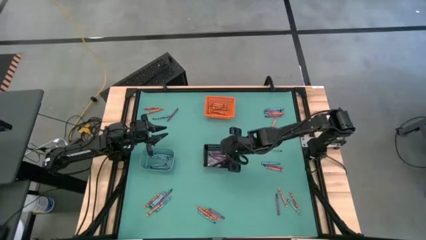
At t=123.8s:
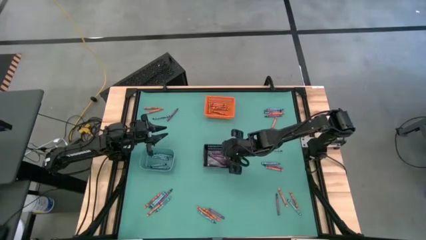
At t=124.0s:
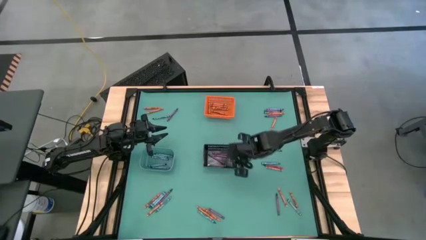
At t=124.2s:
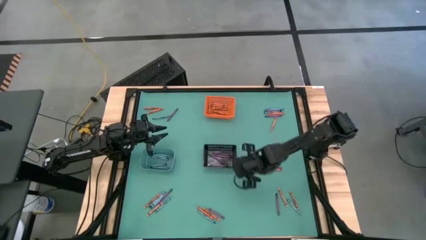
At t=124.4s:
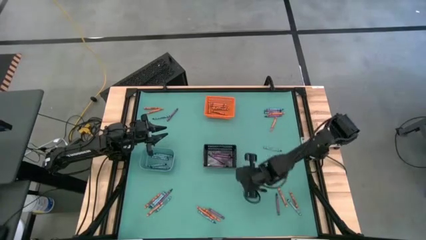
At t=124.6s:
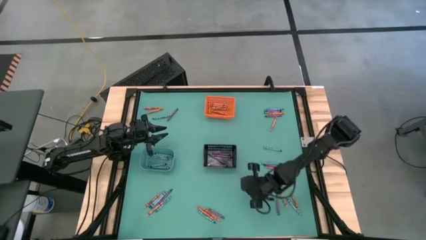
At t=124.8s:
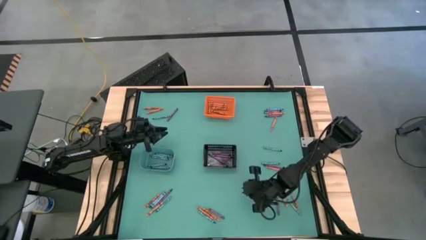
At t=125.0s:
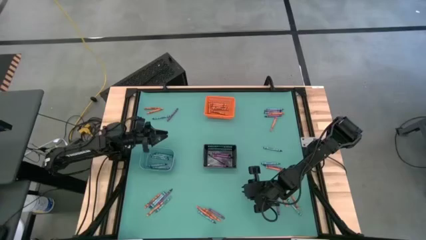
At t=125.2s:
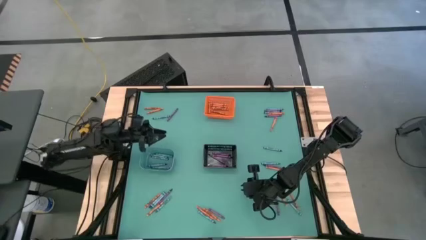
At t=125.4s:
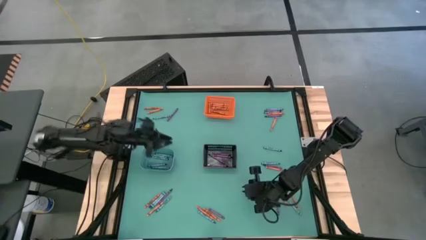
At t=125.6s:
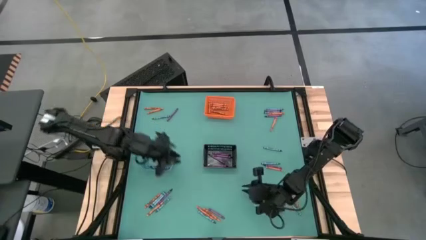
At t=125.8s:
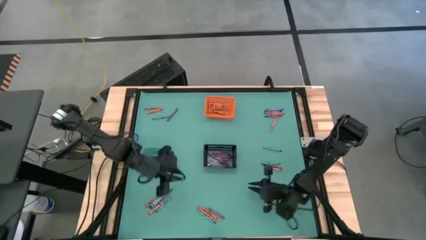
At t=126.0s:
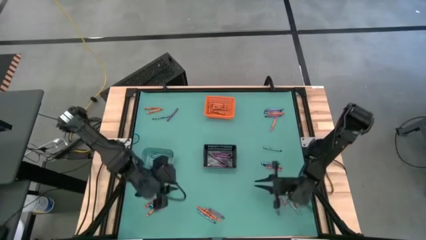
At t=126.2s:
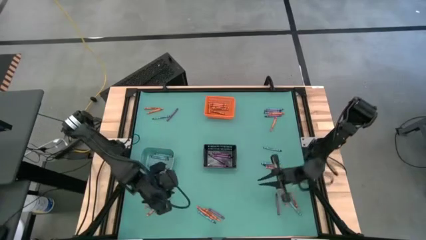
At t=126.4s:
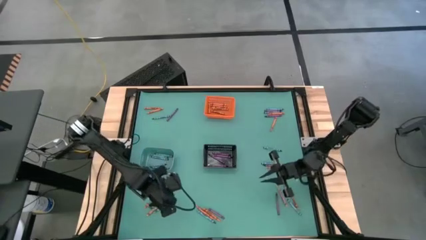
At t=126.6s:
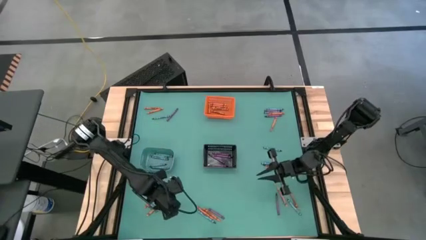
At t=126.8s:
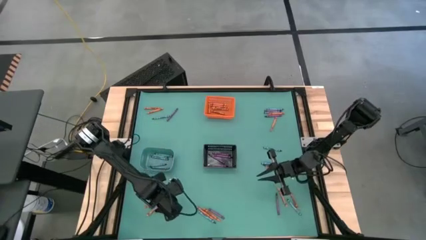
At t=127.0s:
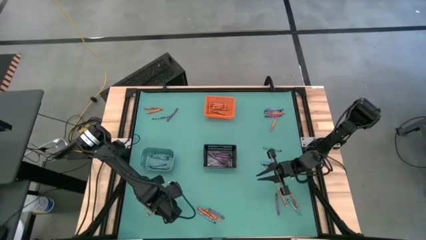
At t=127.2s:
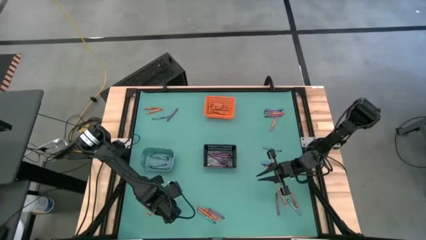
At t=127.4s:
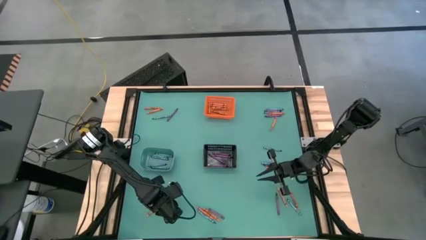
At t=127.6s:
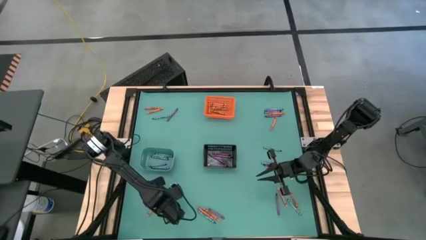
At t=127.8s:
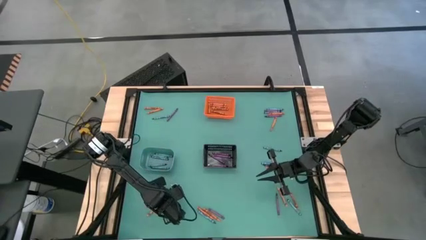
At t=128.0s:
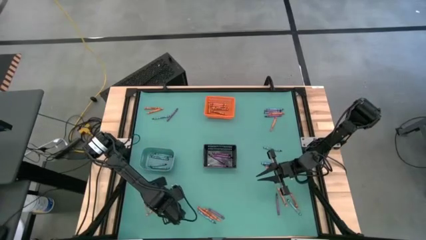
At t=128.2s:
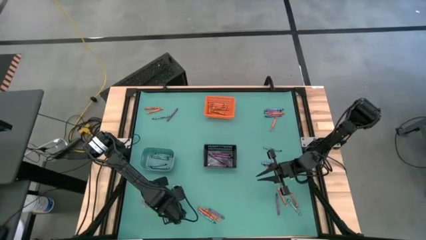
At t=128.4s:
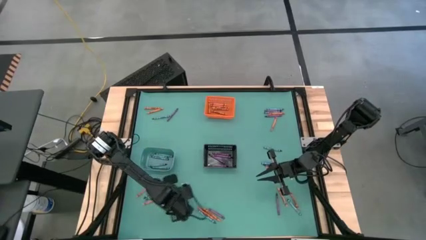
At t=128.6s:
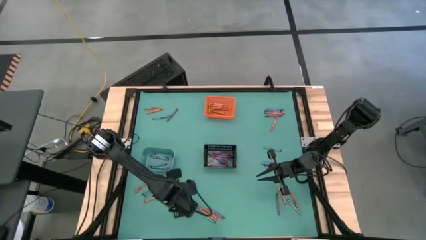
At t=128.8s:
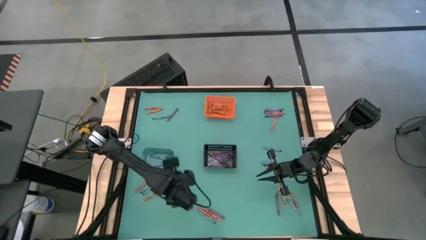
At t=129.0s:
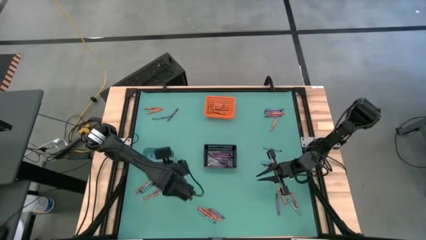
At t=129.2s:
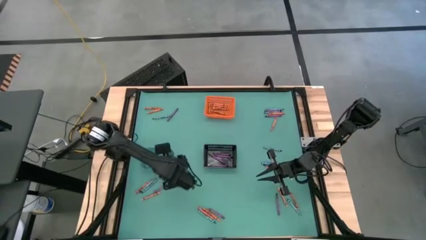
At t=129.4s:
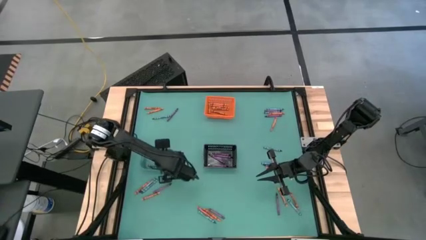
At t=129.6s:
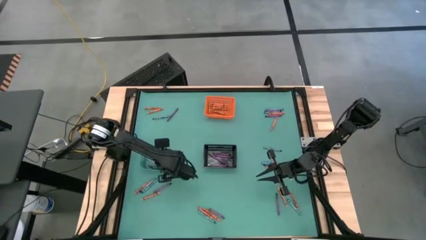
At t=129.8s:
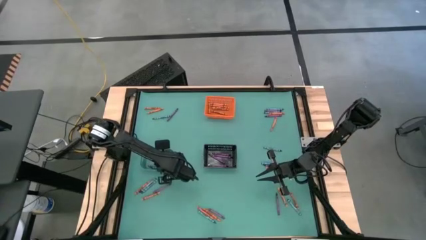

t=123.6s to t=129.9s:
Task: Sort crayons
Put the blue crayon into the light blue bin

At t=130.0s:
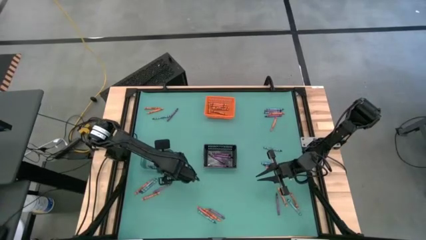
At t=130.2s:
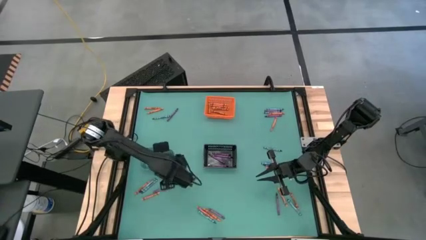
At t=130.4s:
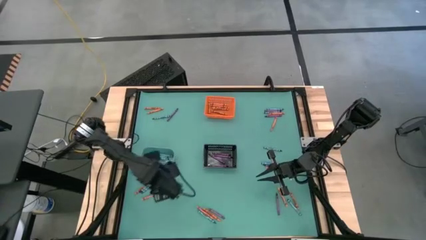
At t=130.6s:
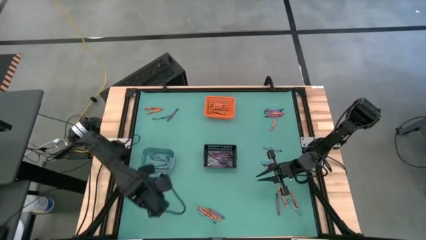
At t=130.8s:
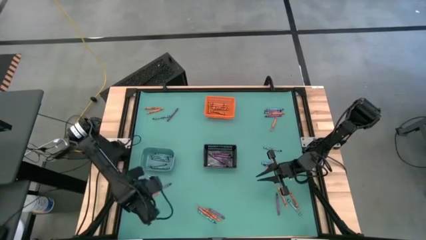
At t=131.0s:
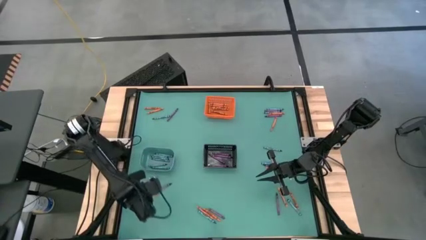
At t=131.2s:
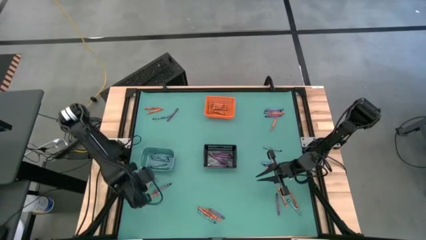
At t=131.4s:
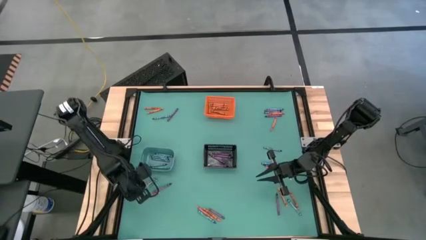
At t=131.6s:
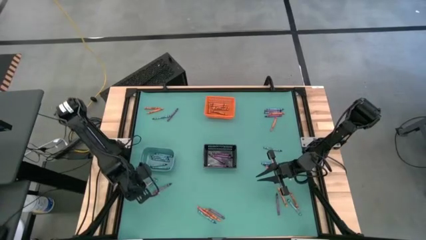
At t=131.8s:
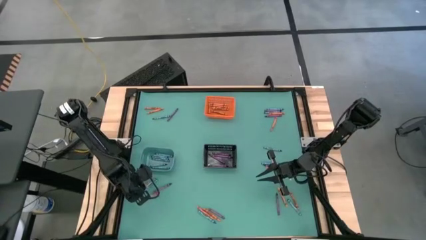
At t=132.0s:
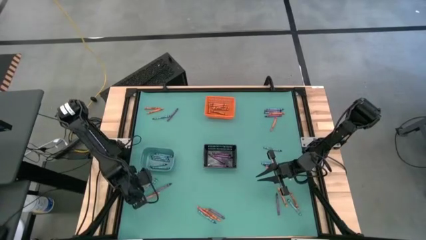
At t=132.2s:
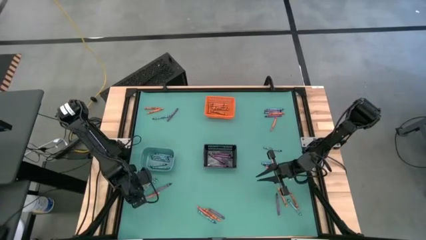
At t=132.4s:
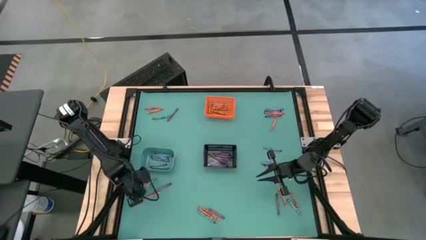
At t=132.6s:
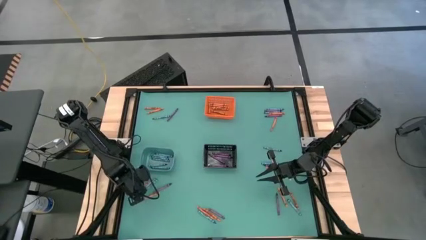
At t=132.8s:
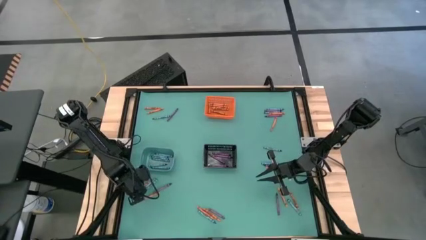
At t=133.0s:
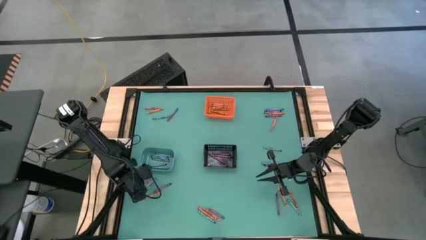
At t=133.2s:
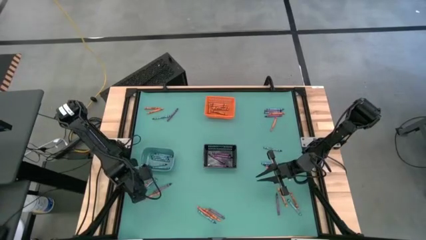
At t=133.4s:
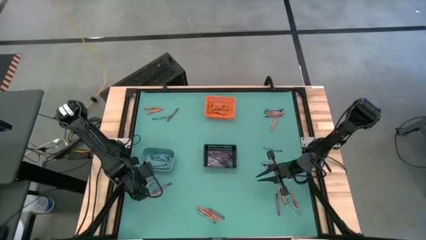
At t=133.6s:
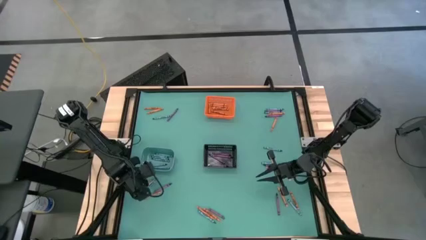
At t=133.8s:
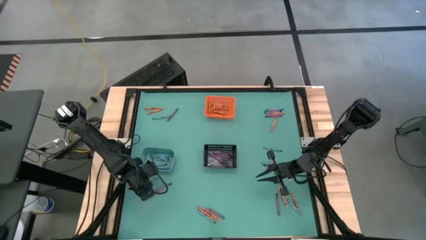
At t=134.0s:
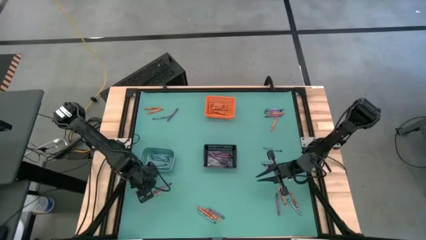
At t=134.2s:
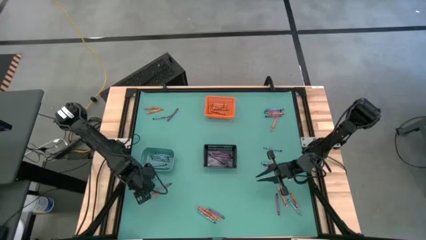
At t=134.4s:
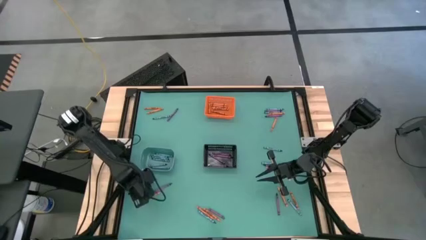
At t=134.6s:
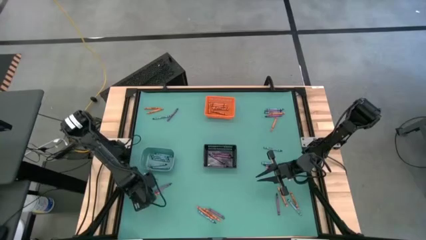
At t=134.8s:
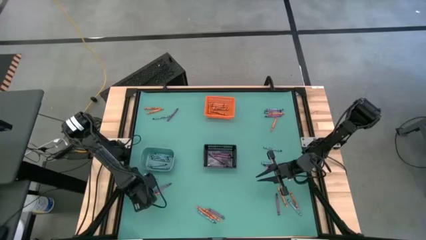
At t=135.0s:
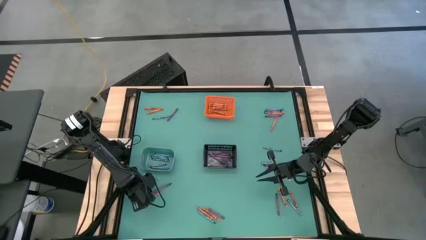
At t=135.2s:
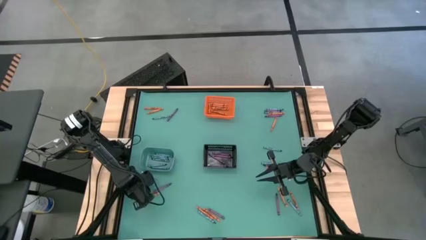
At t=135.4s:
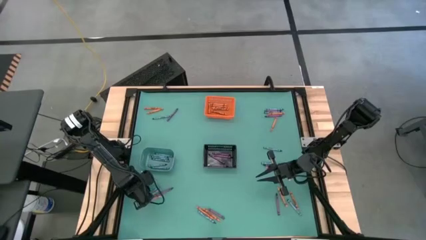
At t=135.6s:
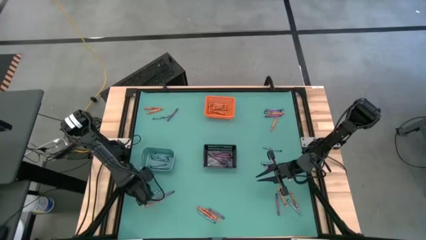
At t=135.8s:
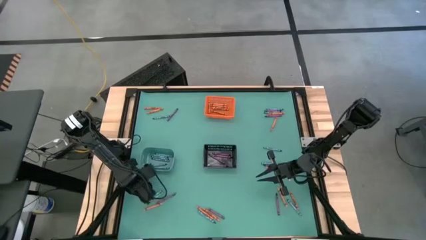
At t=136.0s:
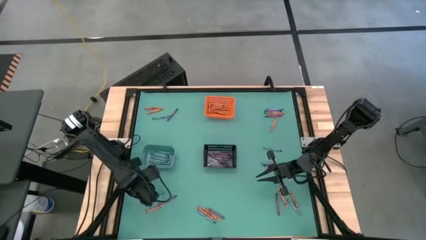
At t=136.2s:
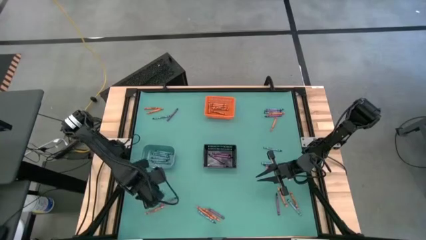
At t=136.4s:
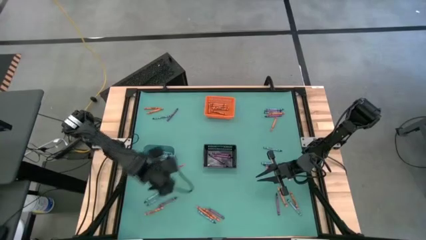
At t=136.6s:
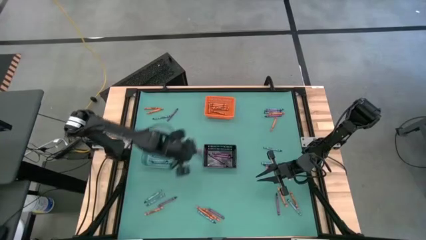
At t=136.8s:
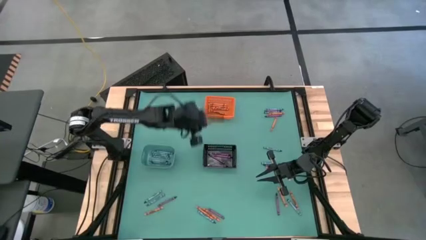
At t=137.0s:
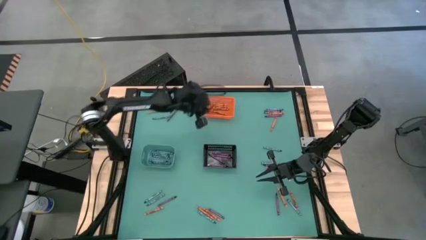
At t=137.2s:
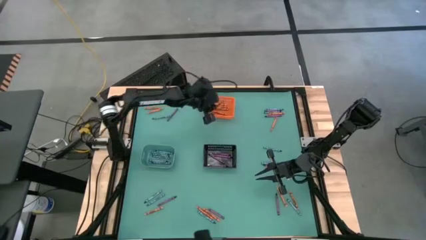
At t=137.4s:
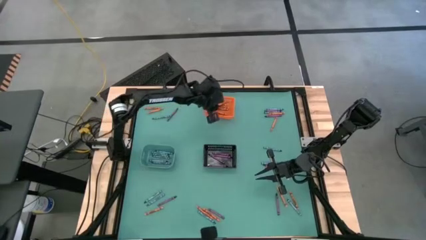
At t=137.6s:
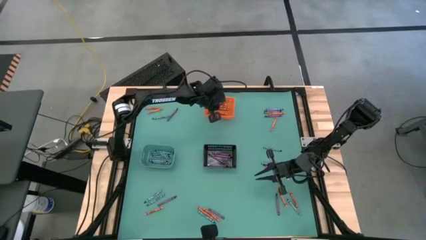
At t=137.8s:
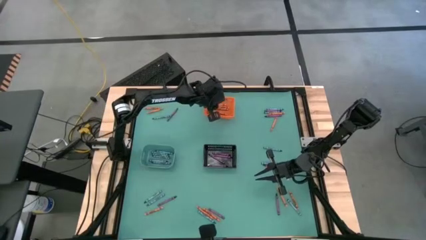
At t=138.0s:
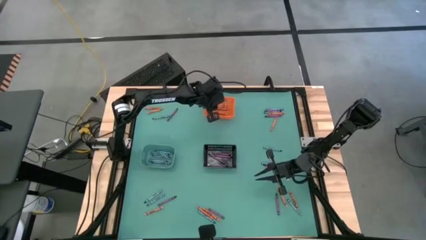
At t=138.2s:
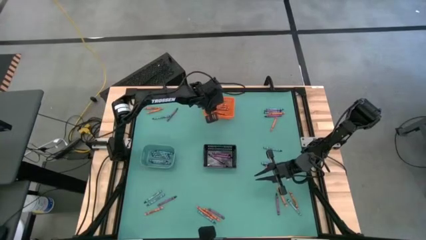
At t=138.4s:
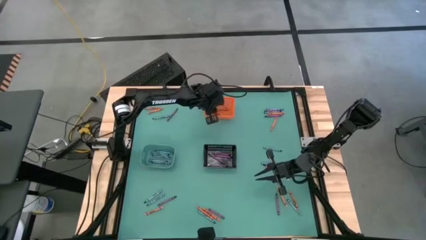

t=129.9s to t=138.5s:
Put the orange crayon into the orange bin

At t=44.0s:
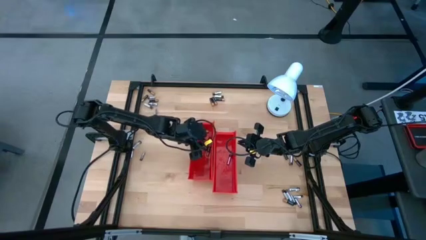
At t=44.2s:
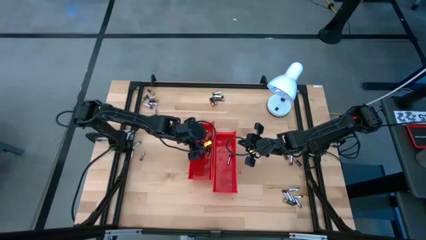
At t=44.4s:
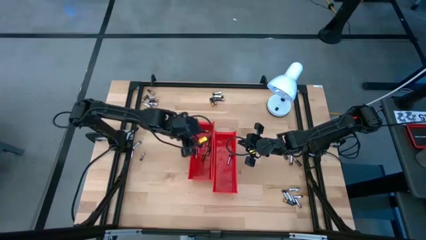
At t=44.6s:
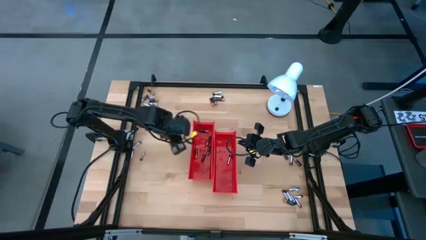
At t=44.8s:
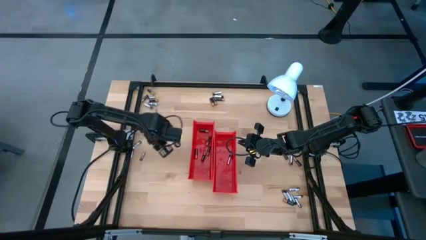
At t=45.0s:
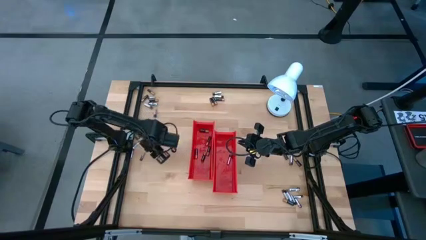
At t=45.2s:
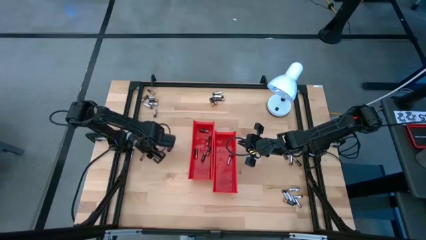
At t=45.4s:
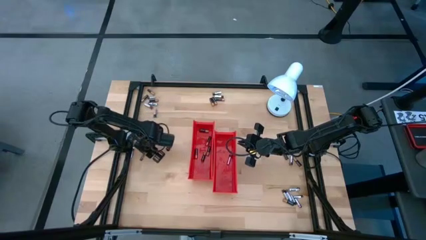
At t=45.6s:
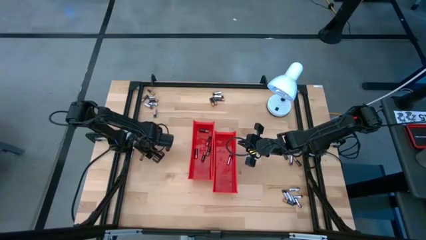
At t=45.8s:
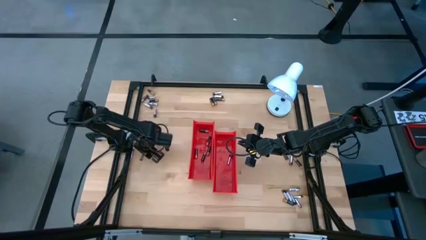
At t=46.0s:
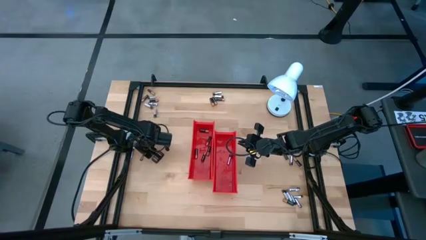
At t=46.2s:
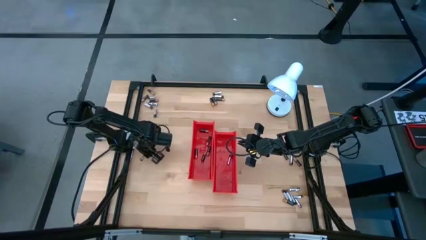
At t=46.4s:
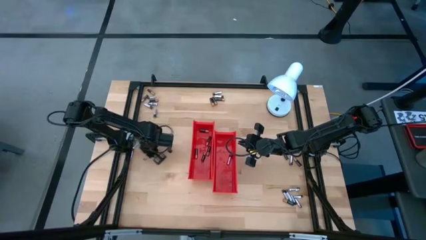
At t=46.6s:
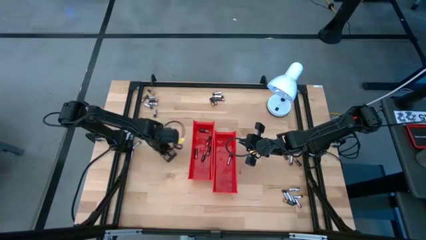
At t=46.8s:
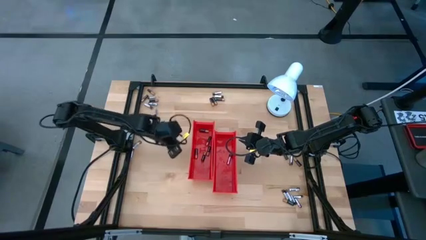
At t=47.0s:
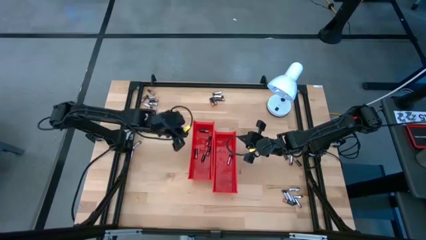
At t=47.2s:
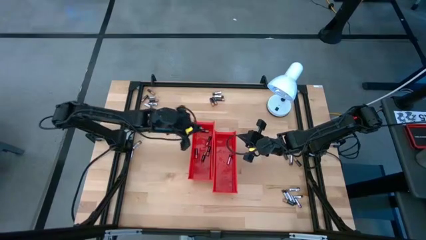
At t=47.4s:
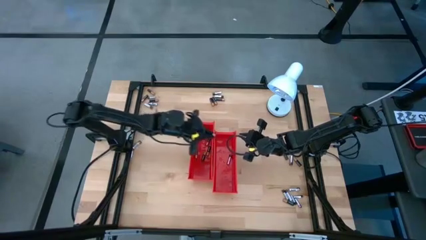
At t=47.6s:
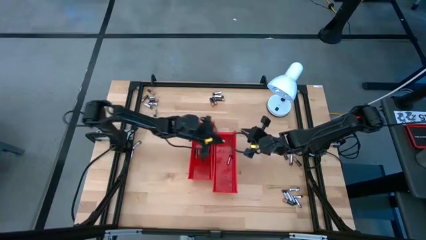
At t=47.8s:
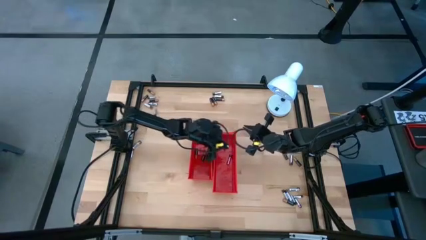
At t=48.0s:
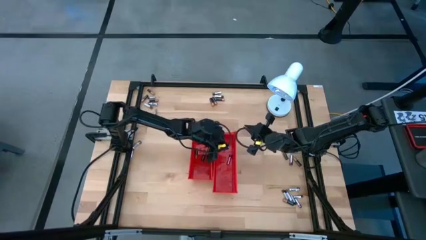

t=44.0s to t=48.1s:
Task: Sort batteries
Put the silver battery into the right red bin
